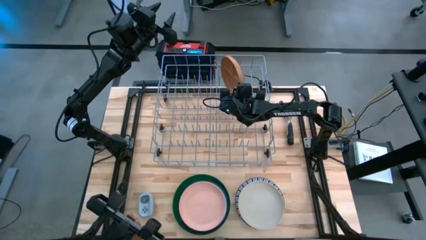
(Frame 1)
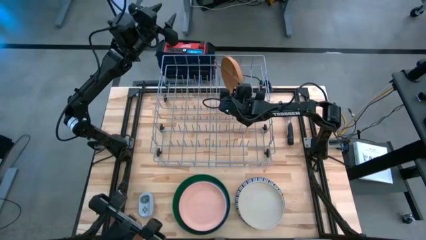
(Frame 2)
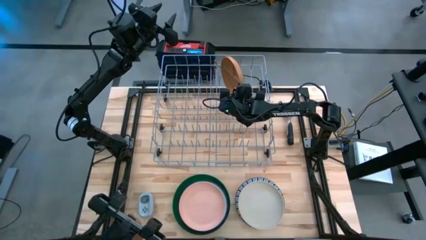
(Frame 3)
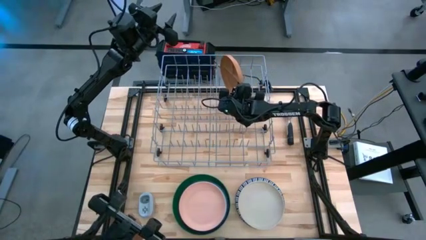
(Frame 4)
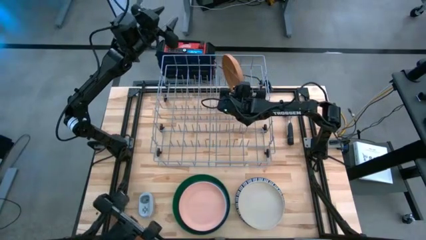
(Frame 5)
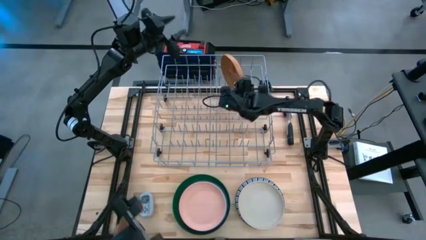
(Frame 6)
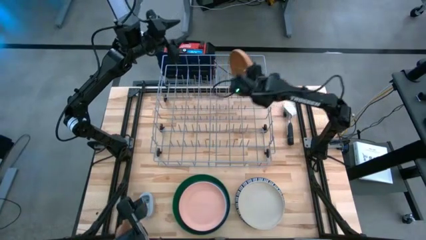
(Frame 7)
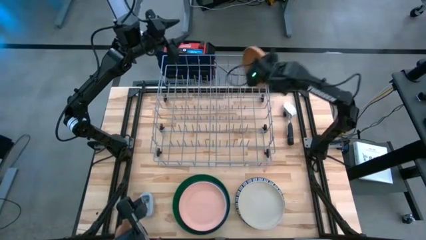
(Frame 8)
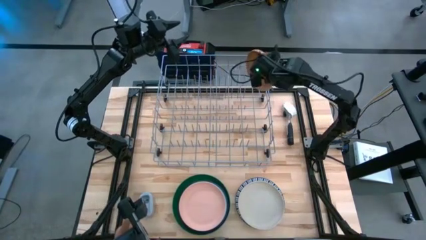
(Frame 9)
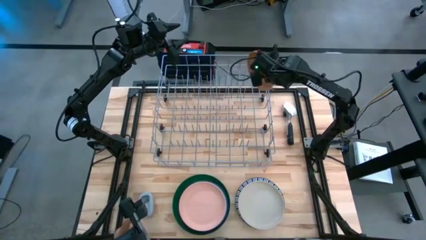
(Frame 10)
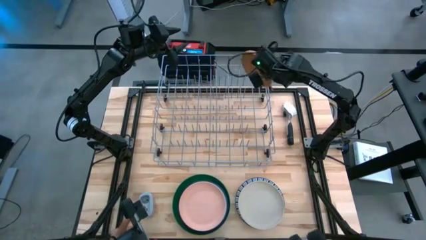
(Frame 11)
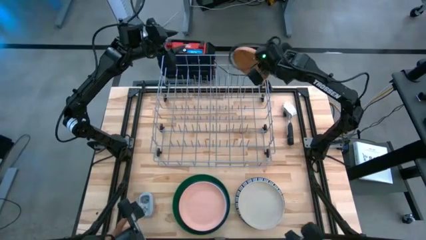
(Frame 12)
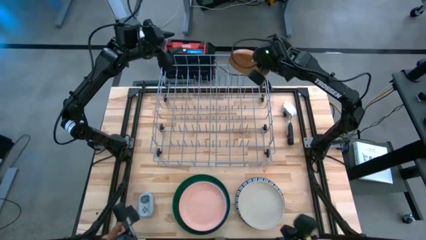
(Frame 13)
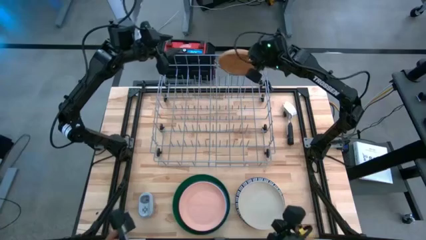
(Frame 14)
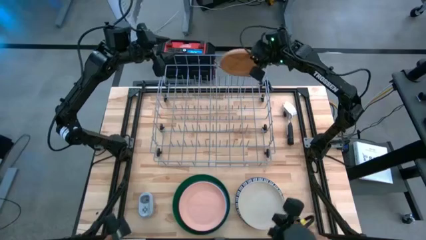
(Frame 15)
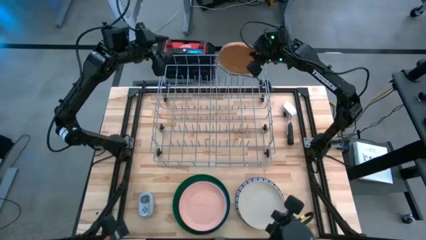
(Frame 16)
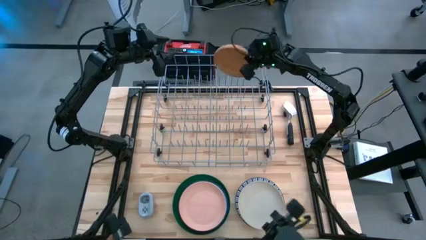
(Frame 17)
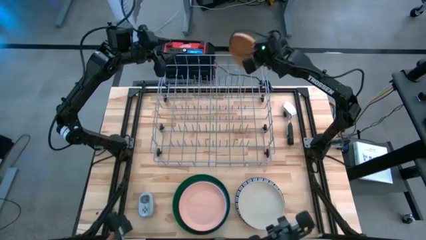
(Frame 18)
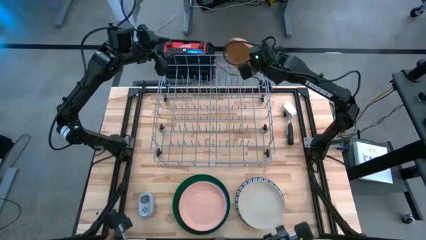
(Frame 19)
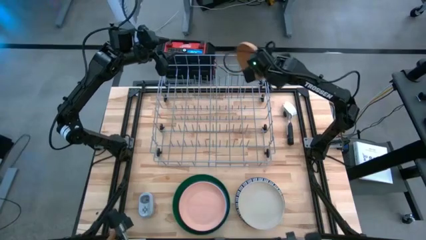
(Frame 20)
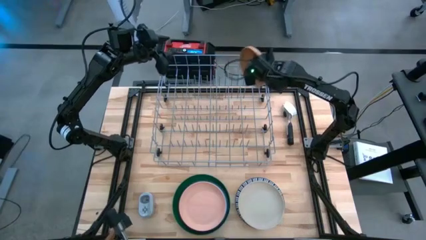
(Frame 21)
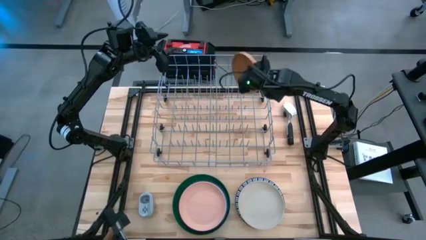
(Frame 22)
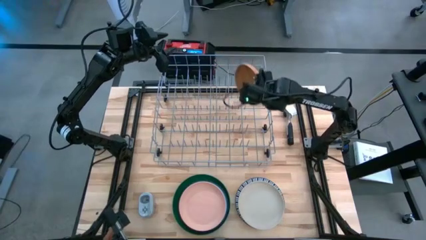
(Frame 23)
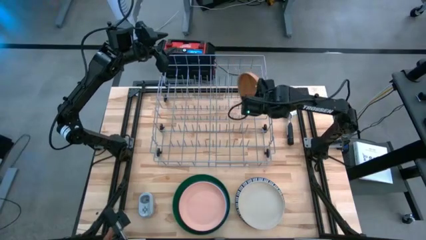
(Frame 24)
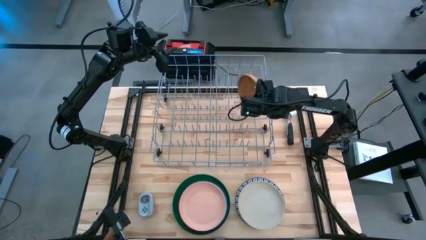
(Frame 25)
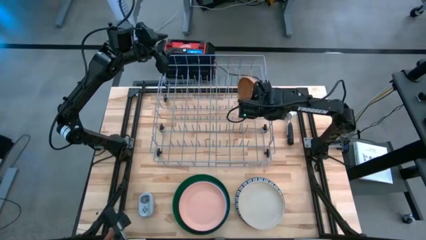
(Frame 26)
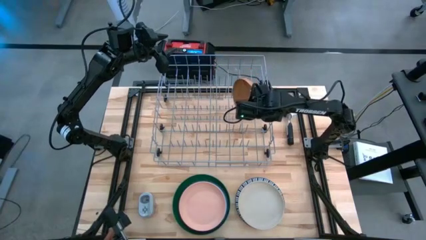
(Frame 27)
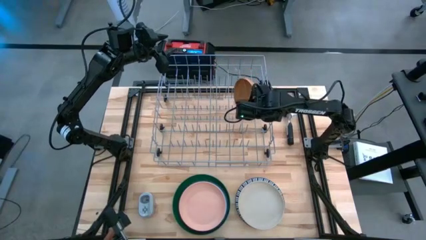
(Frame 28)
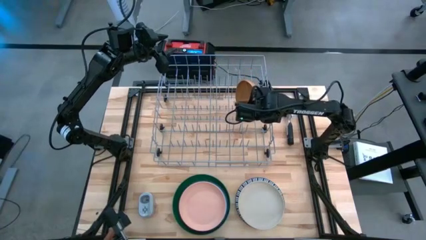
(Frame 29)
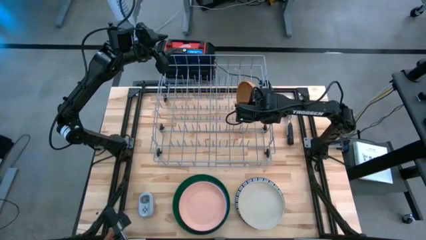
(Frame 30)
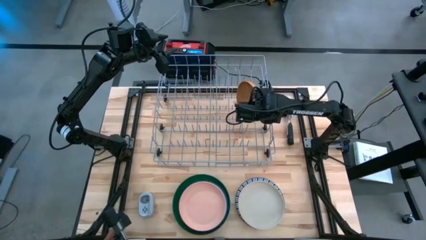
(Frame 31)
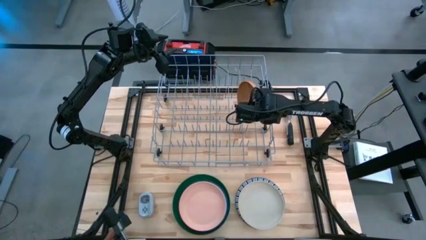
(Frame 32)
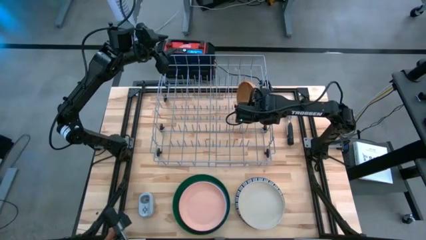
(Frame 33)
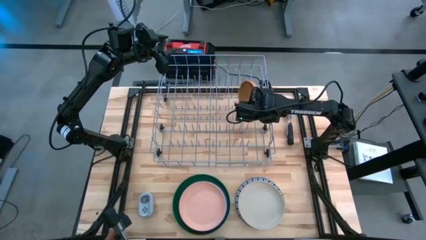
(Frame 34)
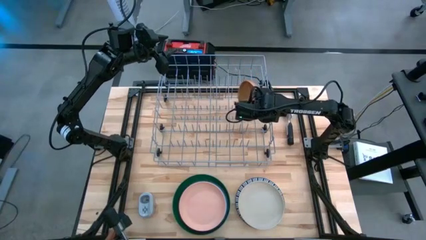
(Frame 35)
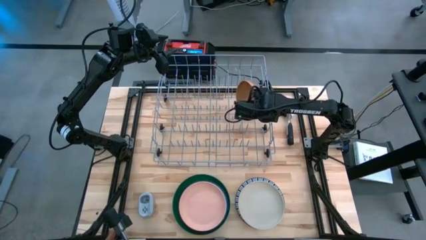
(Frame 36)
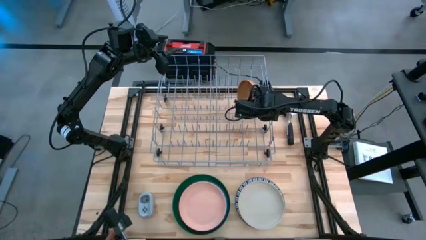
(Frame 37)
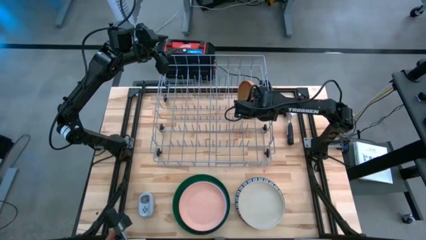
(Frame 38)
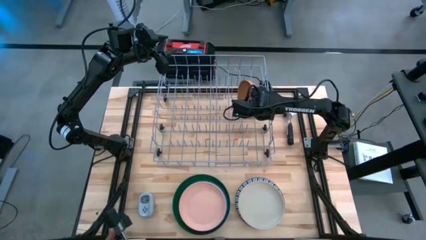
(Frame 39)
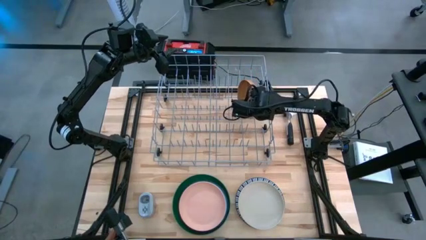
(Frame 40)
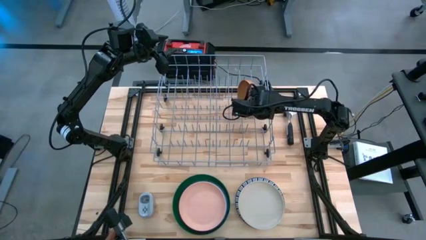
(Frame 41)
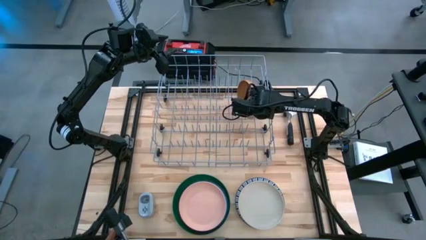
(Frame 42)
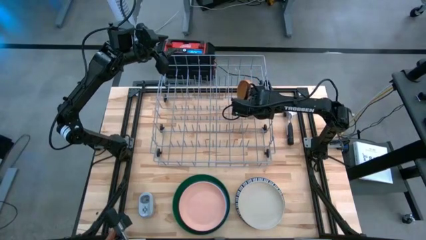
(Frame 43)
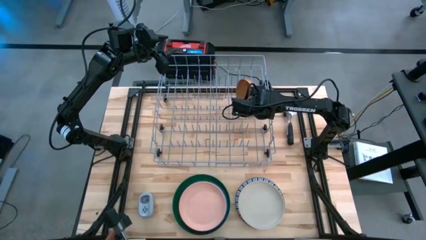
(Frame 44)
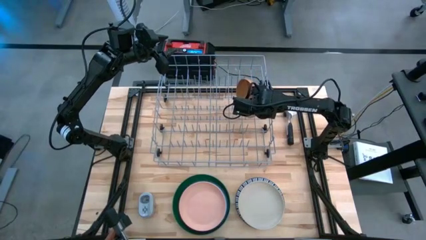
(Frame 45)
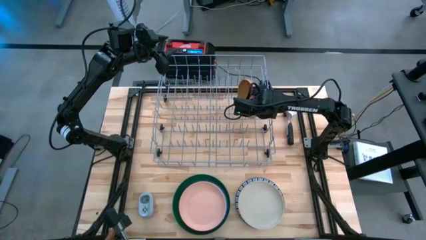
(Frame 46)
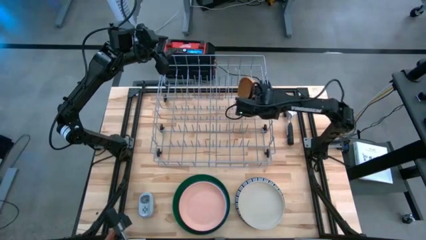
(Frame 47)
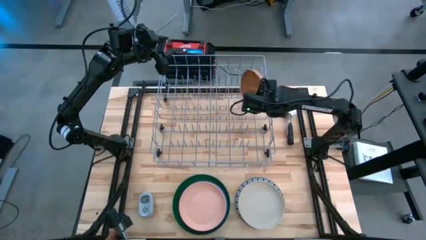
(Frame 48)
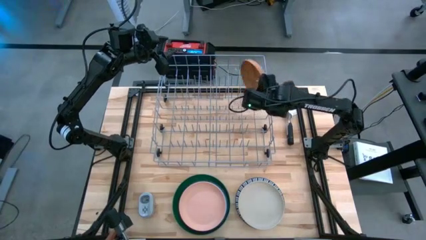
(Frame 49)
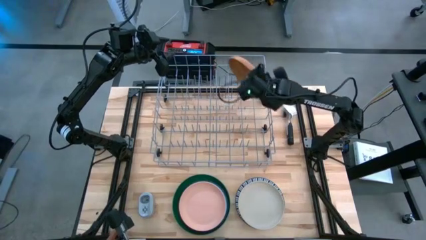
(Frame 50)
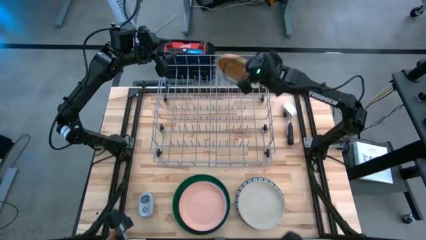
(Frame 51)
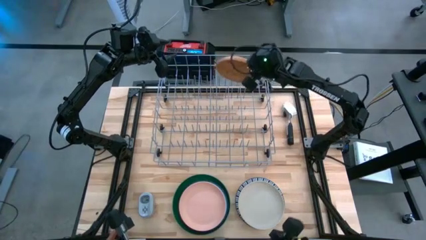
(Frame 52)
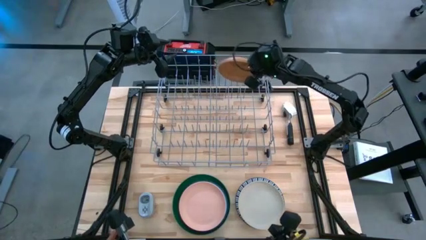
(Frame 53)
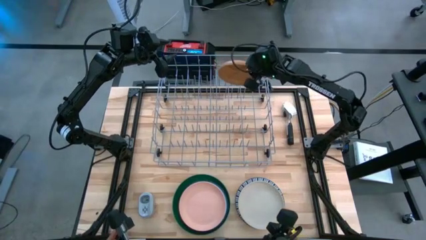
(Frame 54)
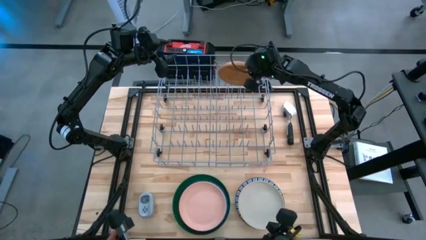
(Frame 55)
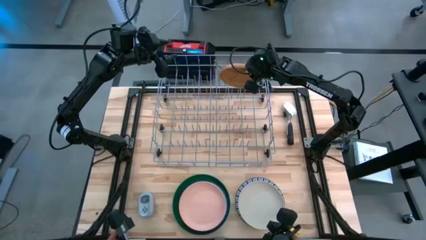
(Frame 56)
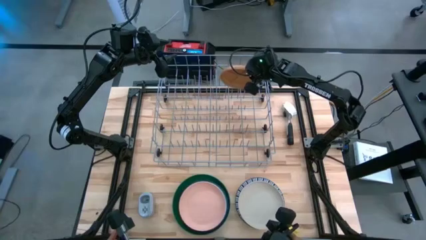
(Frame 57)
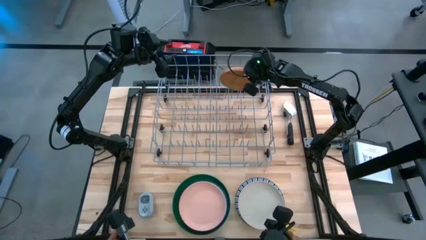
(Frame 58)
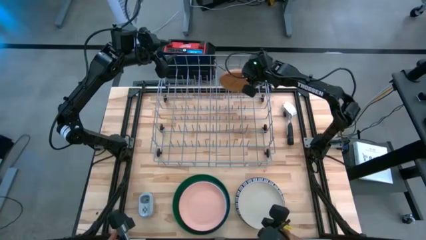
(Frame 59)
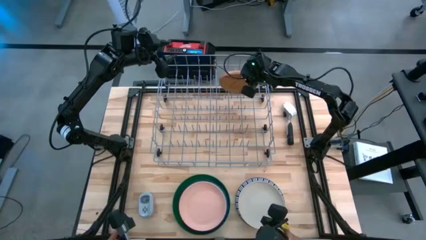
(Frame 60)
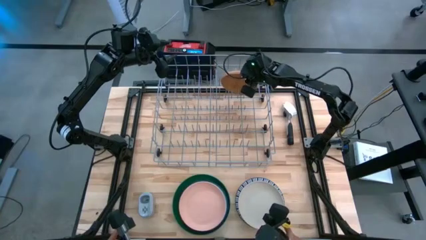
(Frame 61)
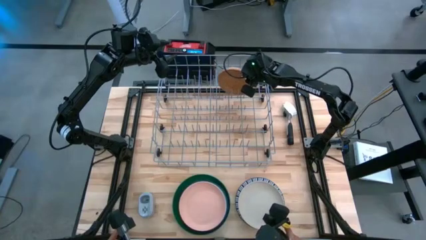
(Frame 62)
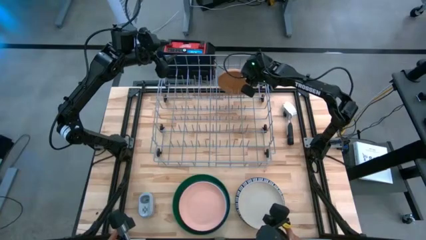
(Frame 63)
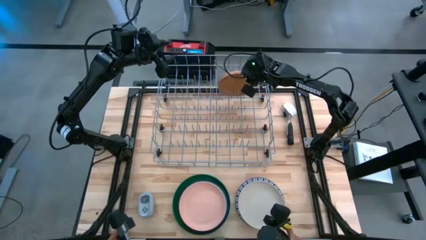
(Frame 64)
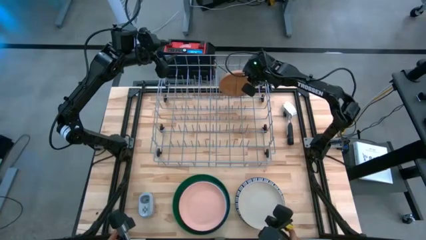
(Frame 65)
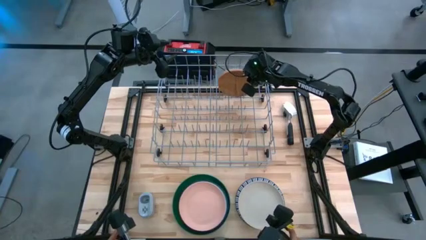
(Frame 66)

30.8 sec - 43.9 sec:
Task: Sort dishes
Put the brown plate into the dish rack
